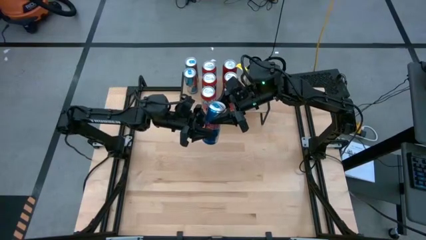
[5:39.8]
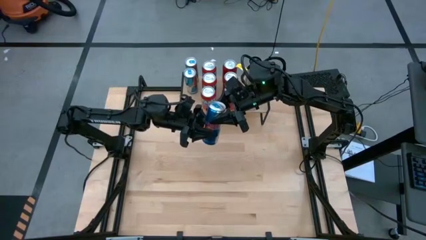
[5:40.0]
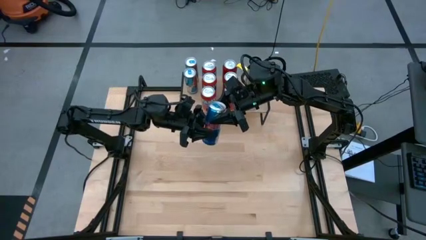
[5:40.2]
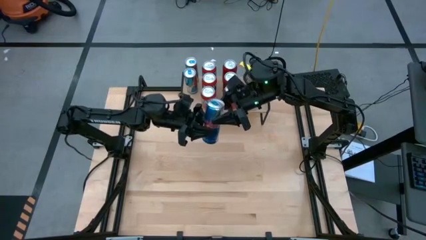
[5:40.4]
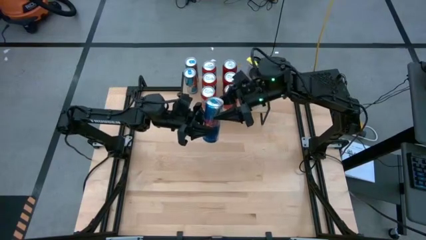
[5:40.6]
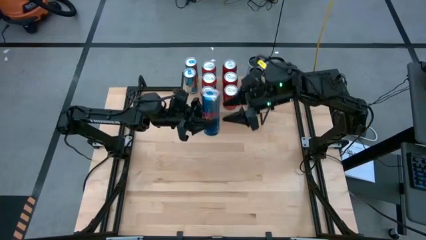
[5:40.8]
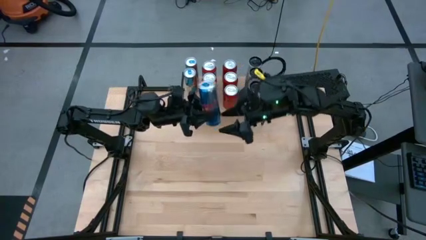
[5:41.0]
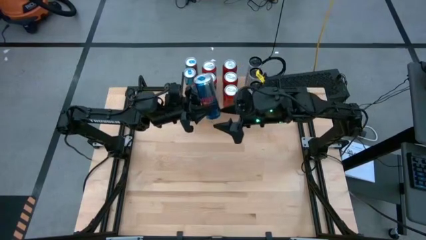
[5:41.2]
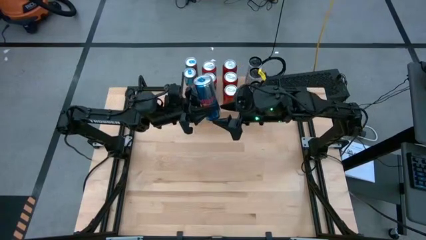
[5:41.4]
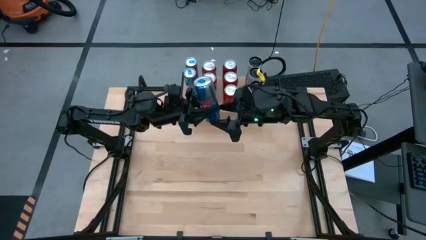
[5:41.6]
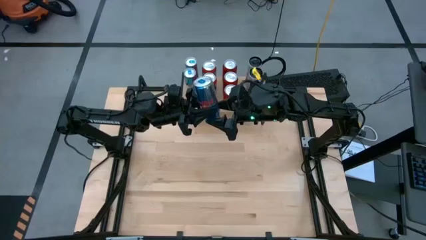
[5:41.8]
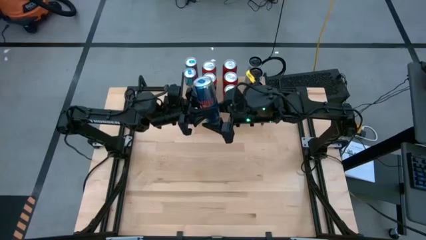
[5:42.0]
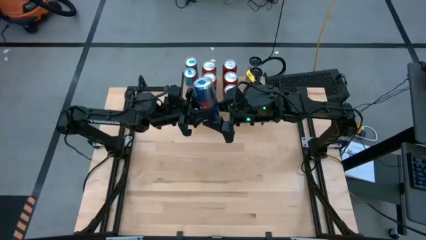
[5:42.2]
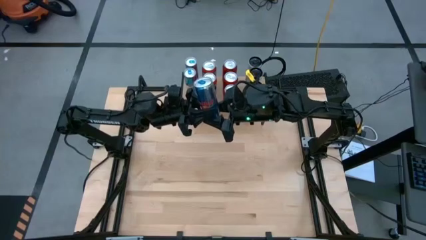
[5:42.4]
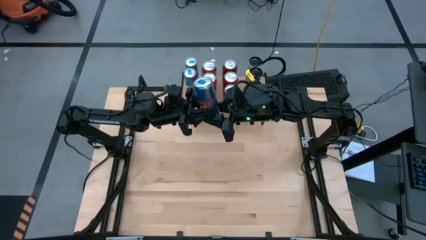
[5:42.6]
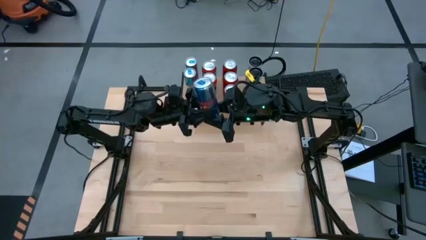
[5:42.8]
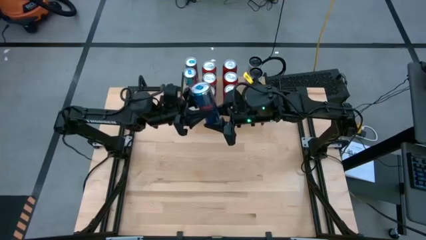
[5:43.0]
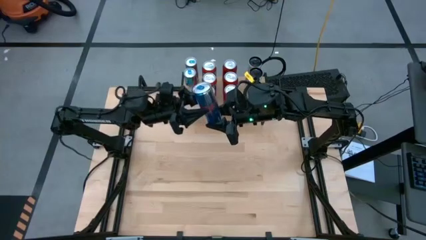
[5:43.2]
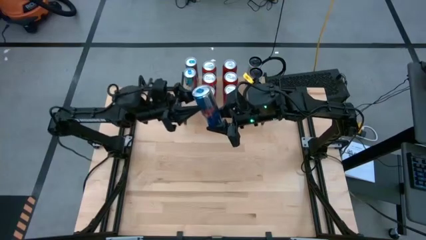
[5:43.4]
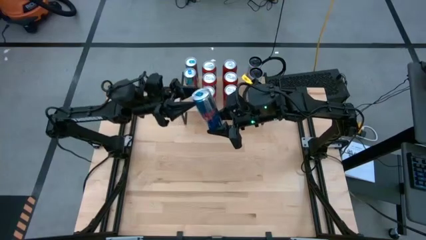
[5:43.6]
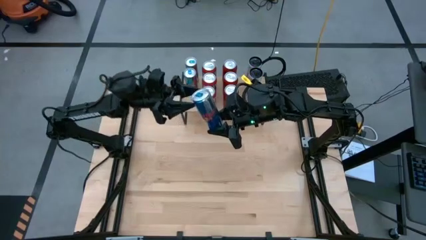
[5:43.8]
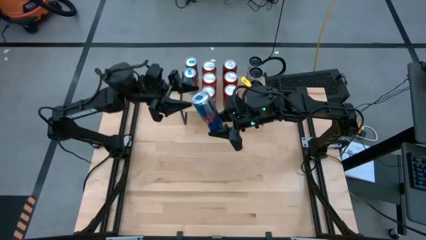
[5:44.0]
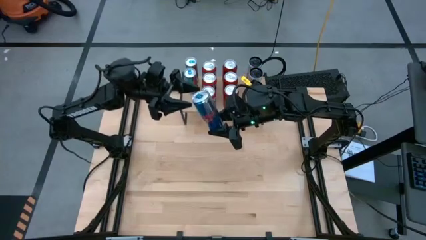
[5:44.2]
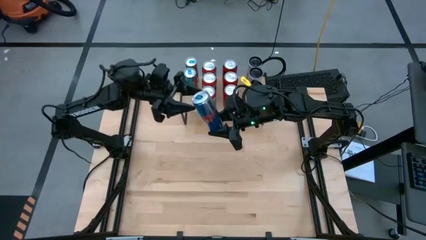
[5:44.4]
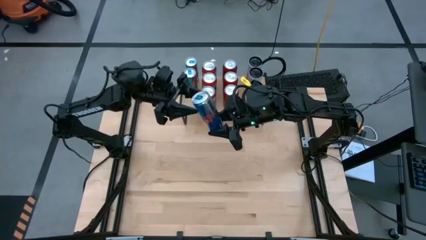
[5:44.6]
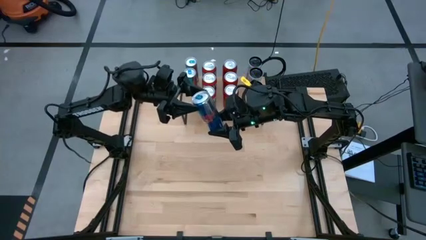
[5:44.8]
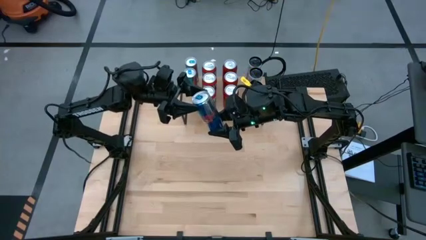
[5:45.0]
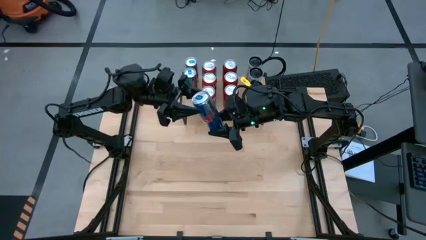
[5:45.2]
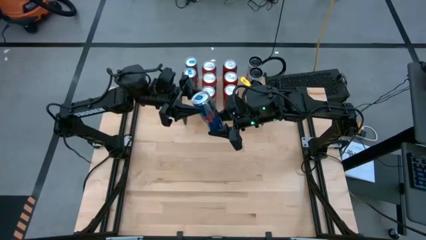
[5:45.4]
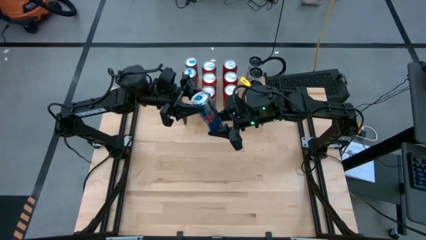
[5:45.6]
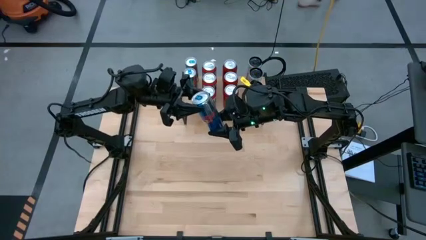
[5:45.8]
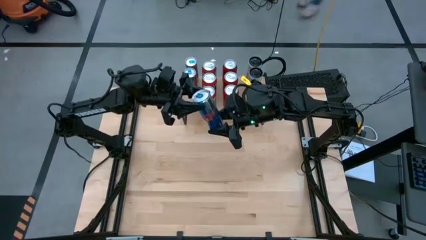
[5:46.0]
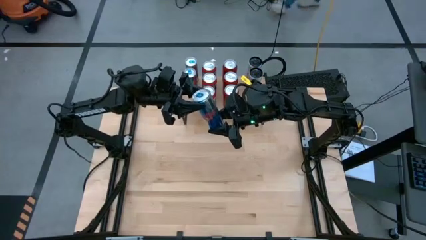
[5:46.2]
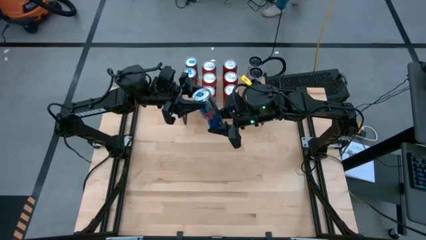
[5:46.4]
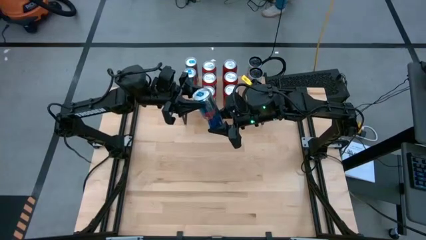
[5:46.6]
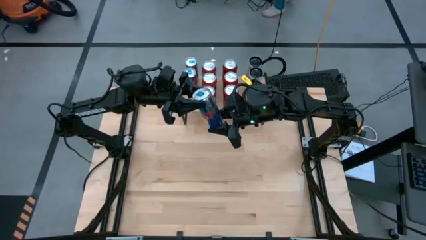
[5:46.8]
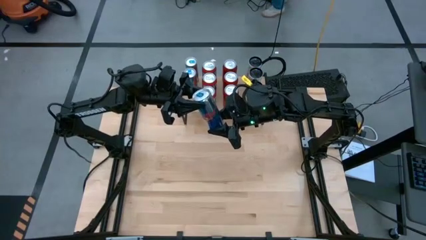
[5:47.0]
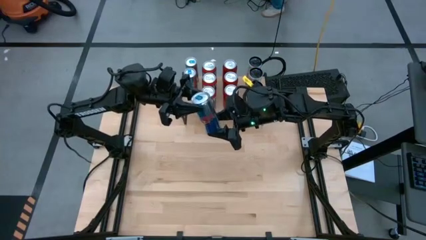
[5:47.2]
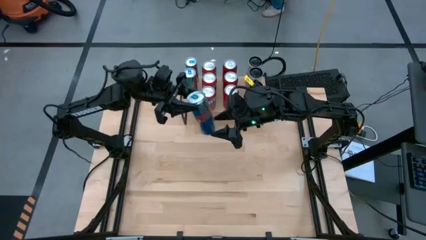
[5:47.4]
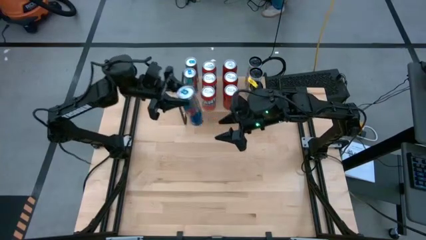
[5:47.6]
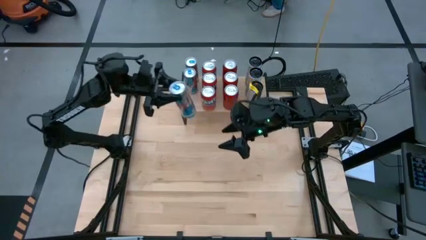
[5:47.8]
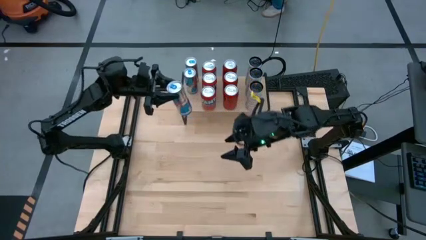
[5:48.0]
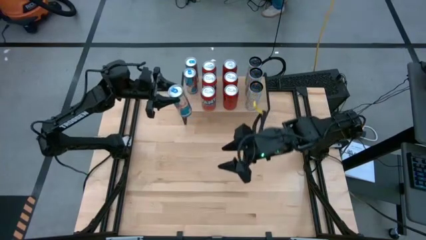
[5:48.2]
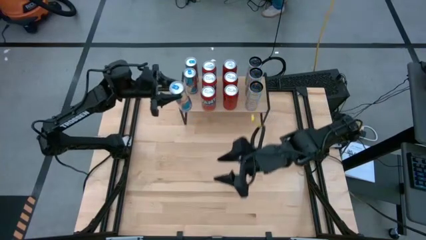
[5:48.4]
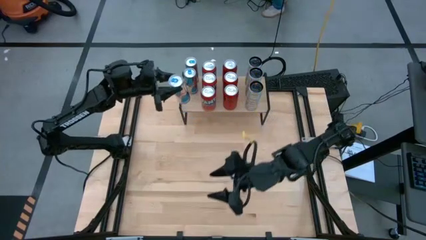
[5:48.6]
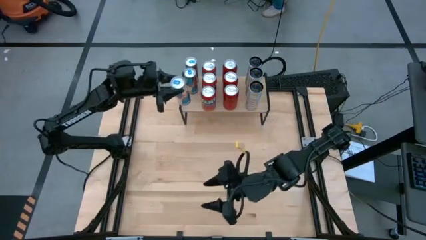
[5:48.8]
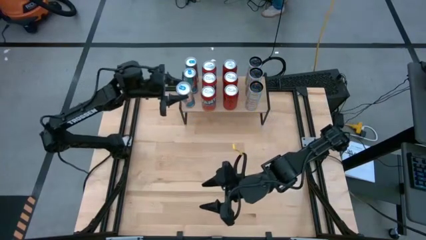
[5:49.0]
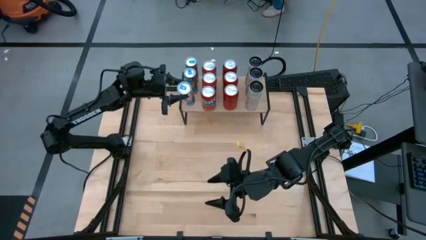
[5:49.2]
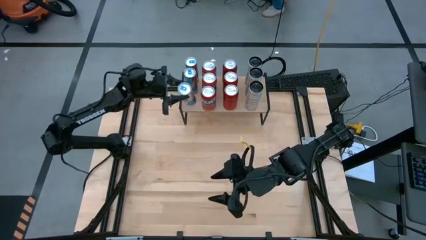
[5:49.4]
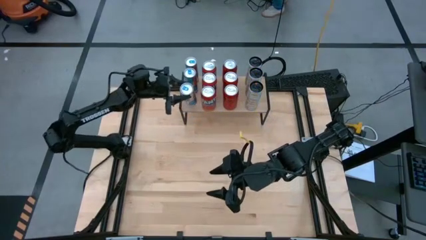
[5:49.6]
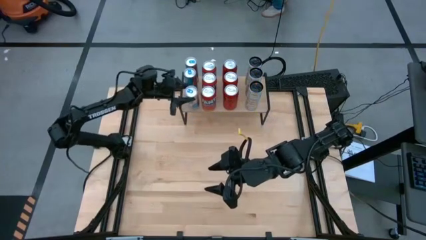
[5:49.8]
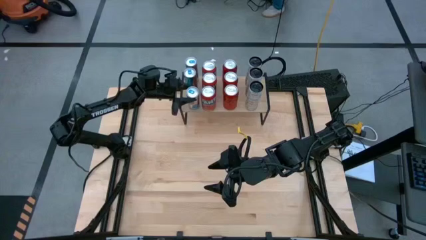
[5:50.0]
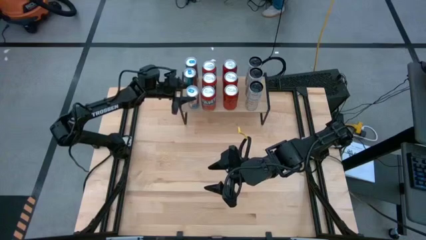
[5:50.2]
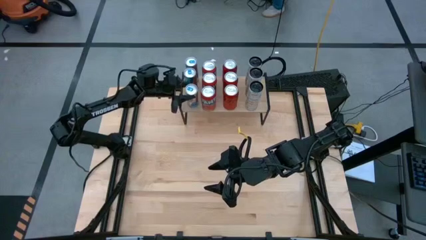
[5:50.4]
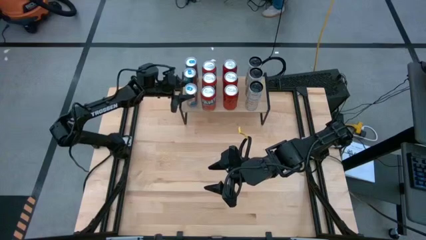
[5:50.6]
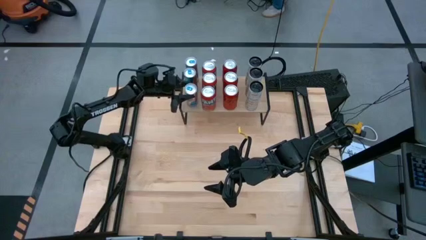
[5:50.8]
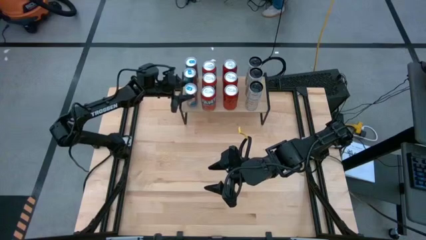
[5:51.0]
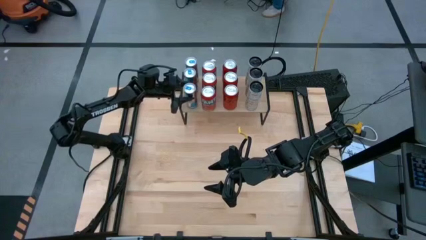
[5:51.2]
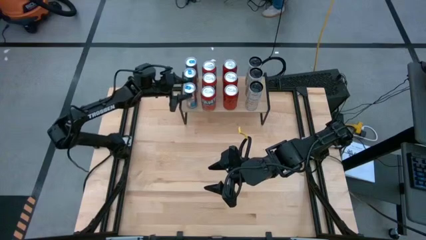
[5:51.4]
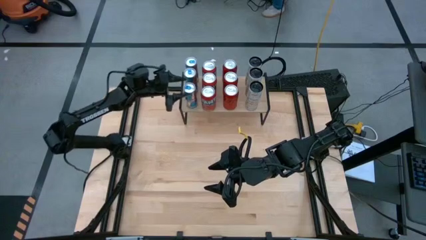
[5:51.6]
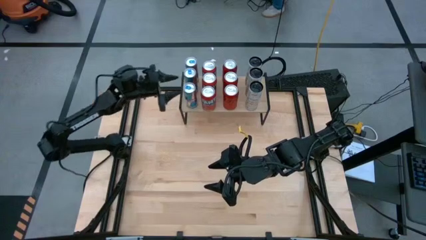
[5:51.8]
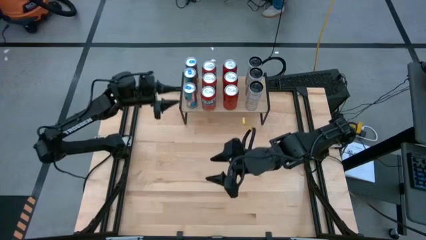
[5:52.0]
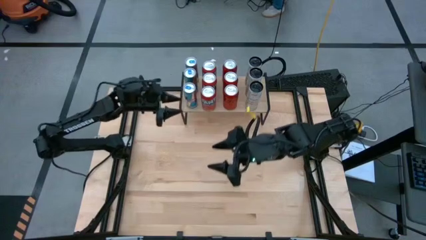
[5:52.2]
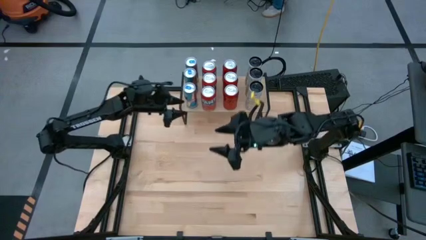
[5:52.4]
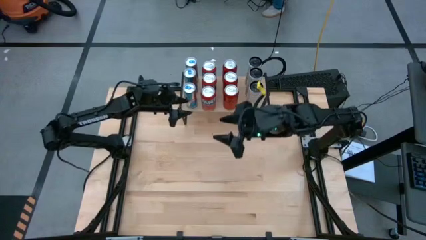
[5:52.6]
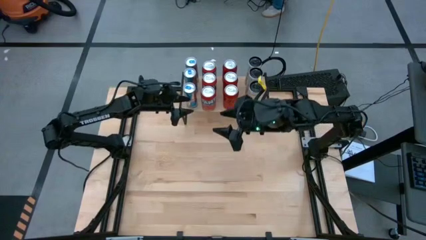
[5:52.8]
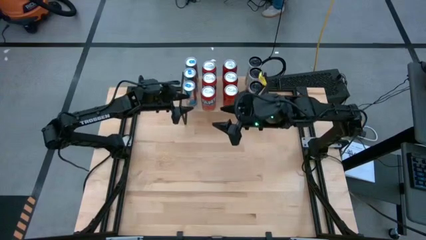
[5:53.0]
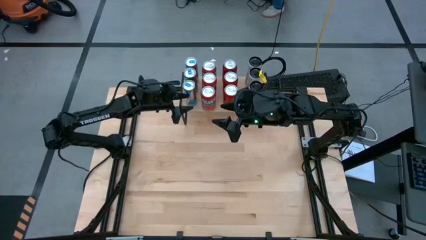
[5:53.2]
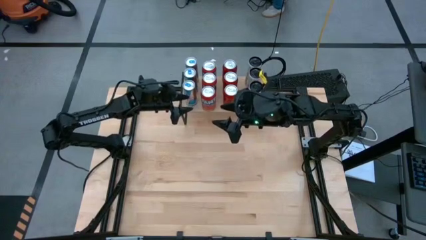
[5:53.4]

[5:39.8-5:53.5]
Task: Place canned beverage on shelf
Put the blue soda can on the shelf aligned with the other blue soda can

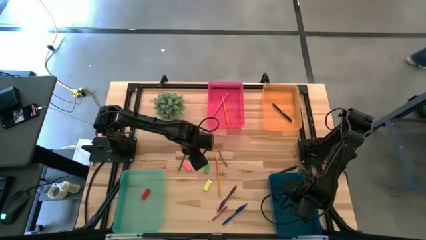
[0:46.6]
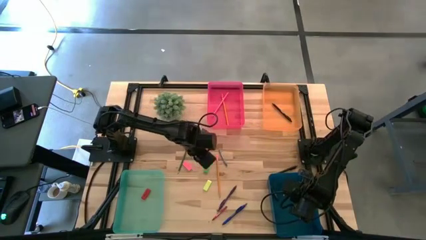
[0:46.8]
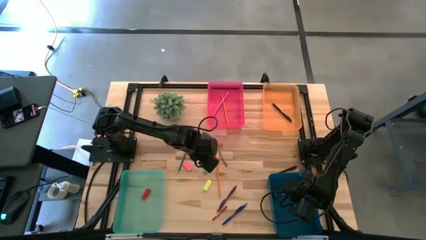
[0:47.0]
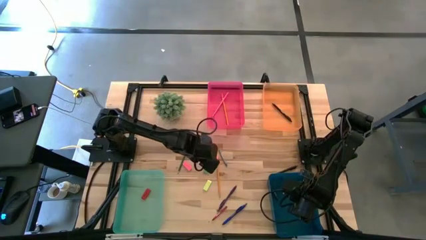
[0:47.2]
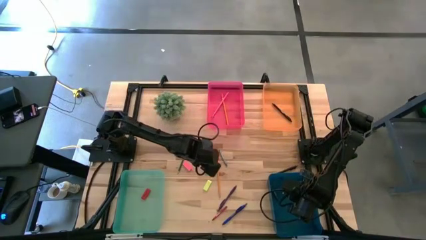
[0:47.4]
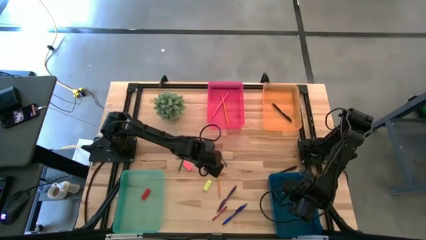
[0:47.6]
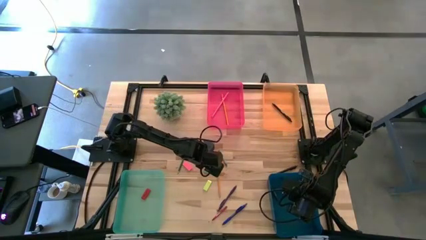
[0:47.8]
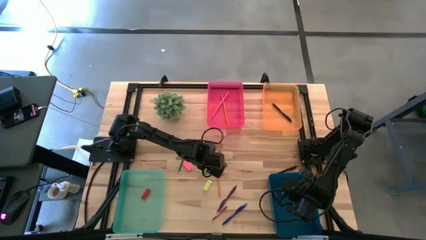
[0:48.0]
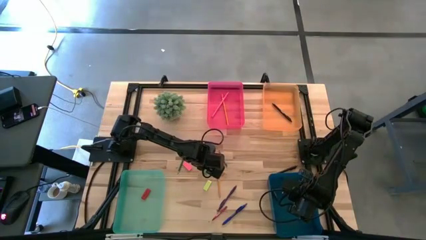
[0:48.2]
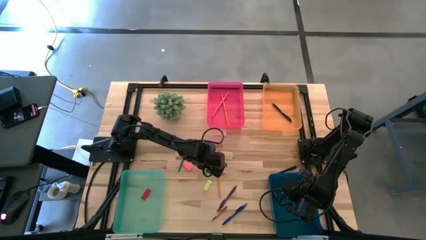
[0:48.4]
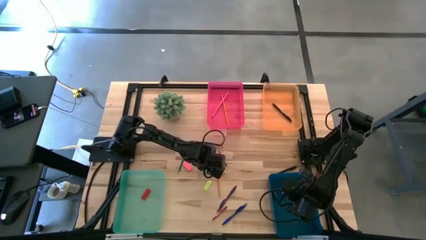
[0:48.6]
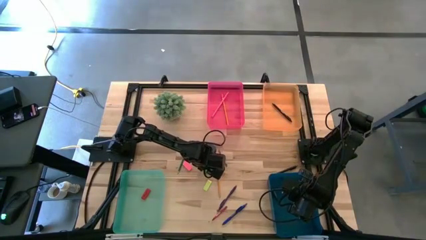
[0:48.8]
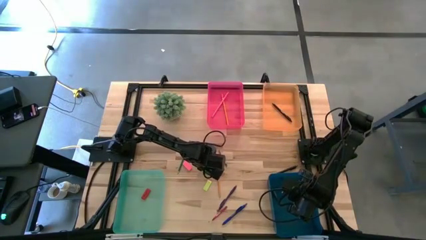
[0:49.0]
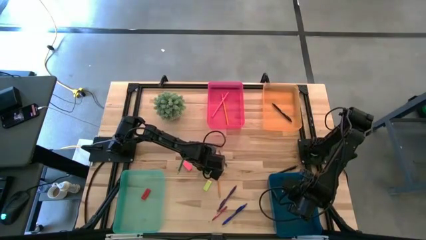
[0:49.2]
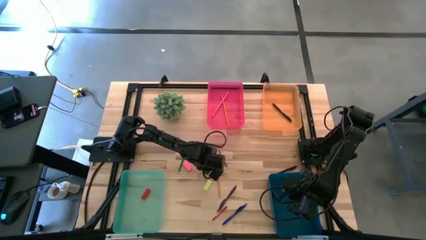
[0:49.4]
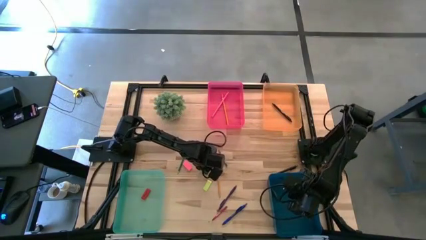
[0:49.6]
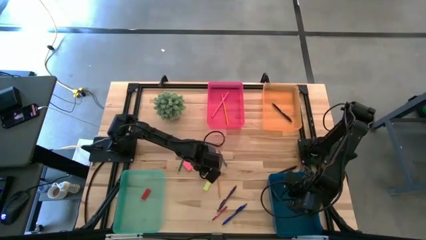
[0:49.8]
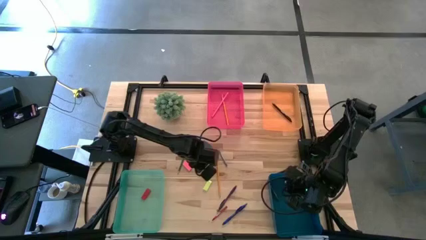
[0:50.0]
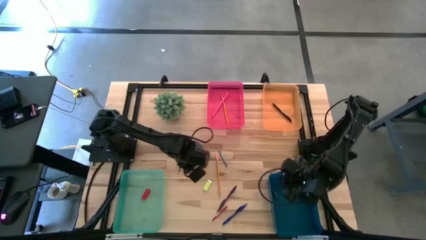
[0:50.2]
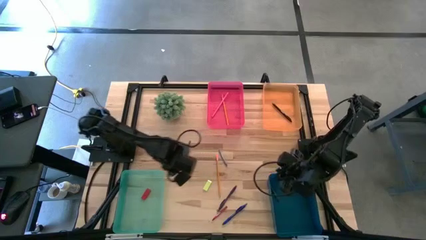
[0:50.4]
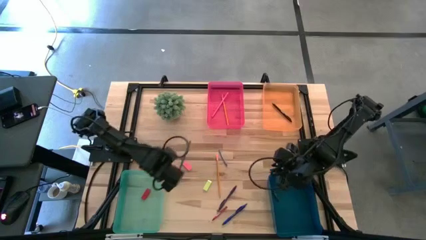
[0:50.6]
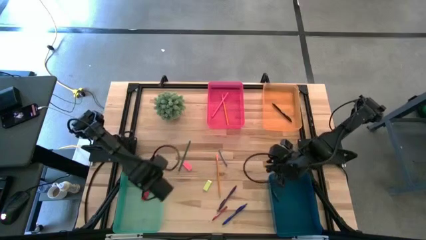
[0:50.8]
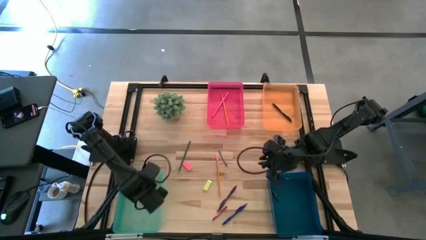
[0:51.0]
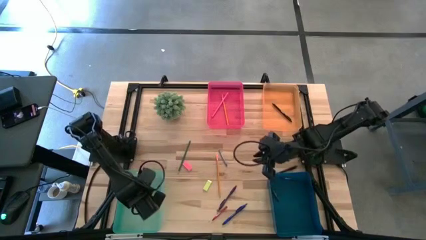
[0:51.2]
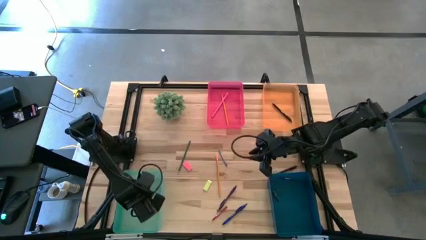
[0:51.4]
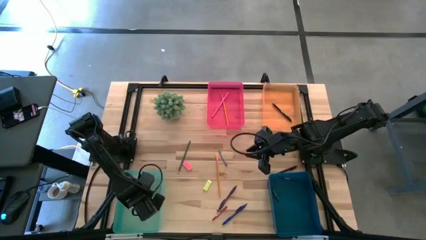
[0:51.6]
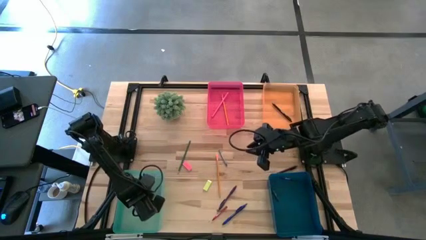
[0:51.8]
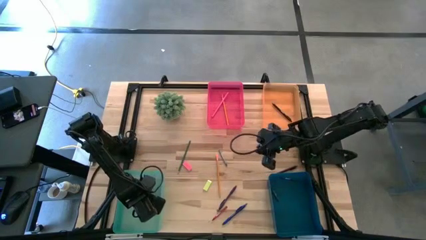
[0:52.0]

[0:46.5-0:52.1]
Task: Sort crayons/erasers/pens/pencils in bins
Put the green eraser into the green bin
